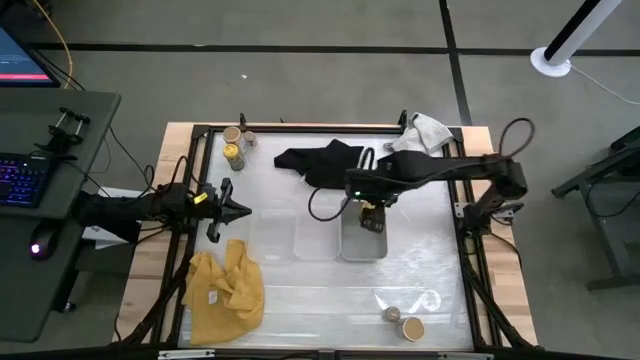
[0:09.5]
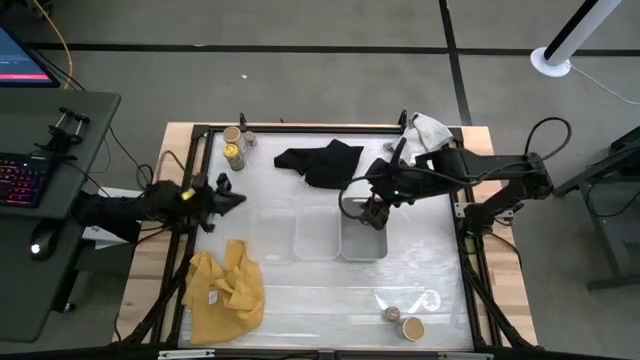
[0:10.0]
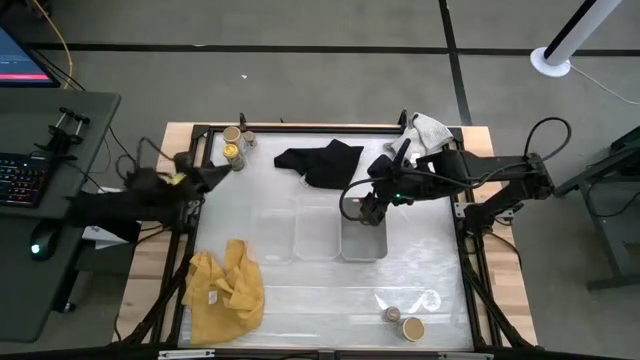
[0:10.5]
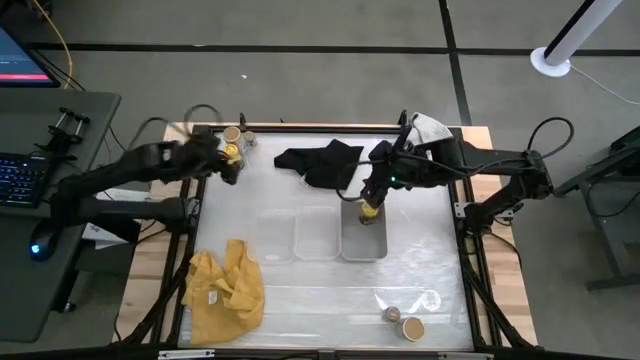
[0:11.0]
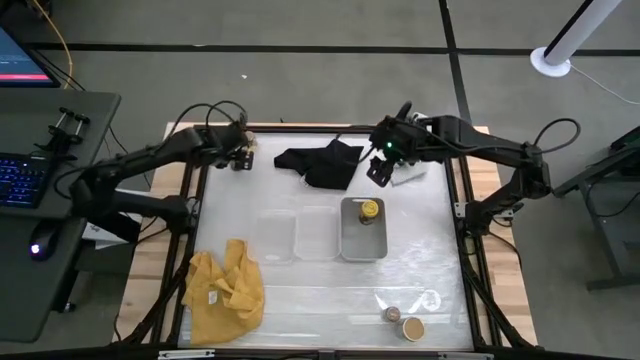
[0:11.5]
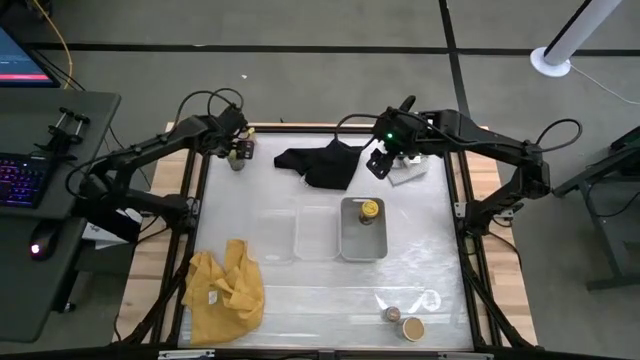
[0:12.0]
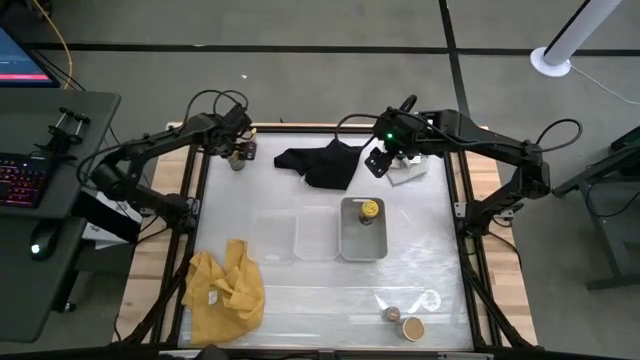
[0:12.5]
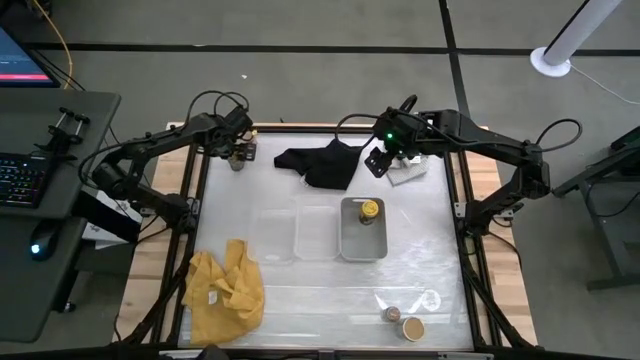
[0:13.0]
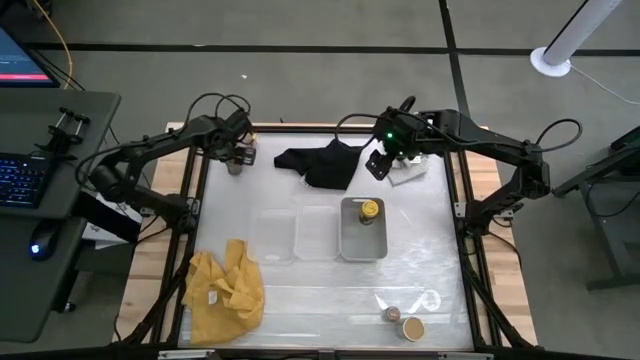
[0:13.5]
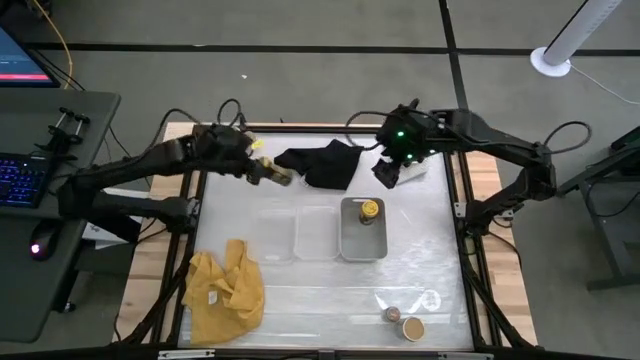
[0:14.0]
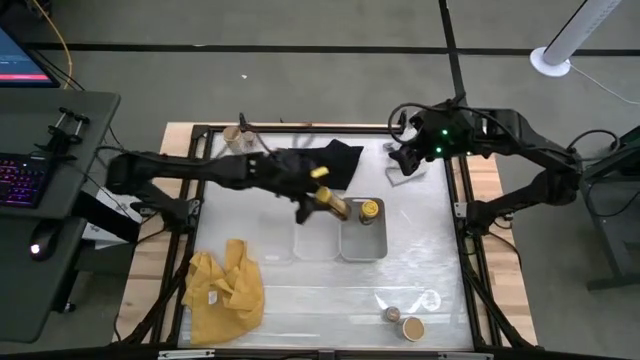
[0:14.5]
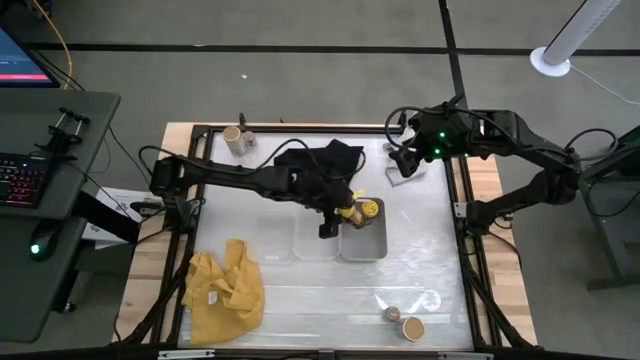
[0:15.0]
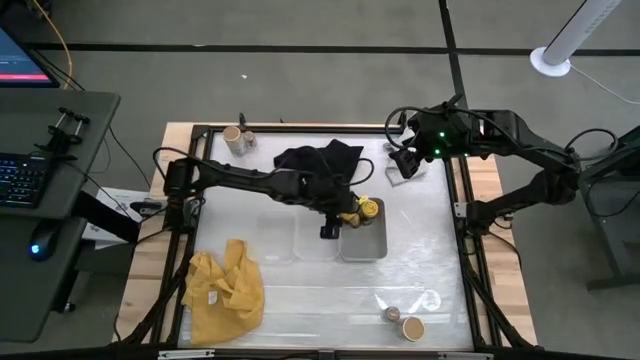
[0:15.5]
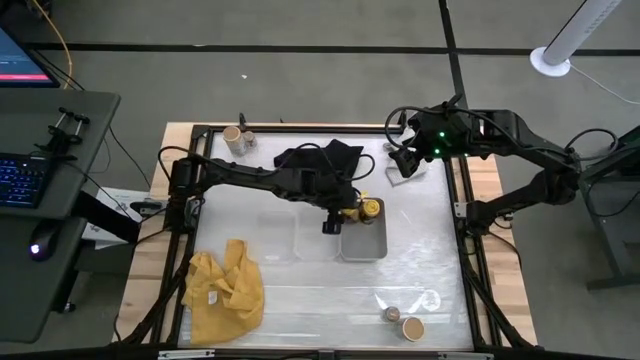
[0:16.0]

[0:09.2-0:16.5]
Task: Sort spices by type
Put the yellow seasoning can into the gray bin

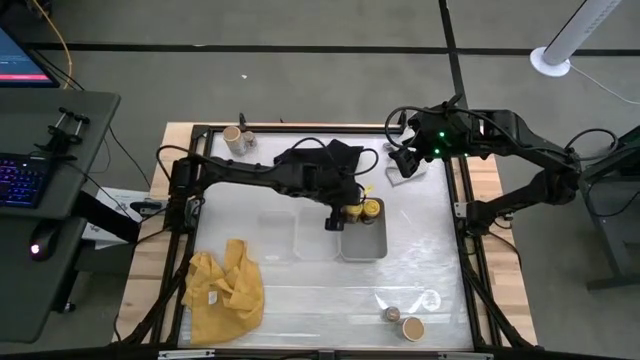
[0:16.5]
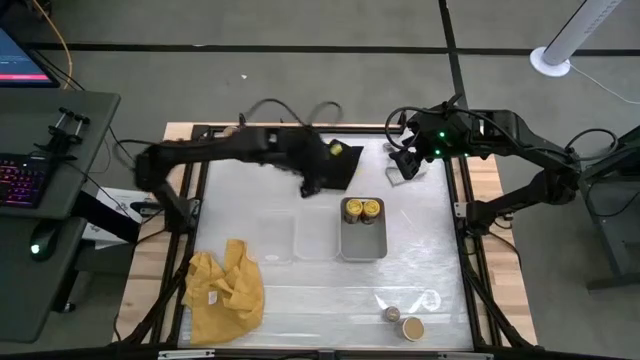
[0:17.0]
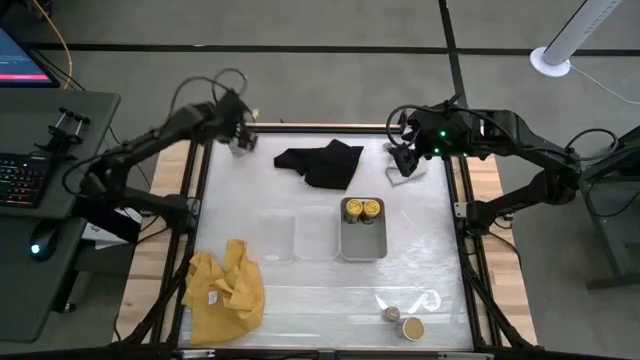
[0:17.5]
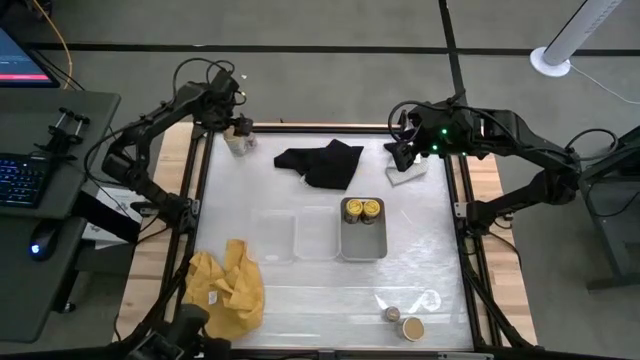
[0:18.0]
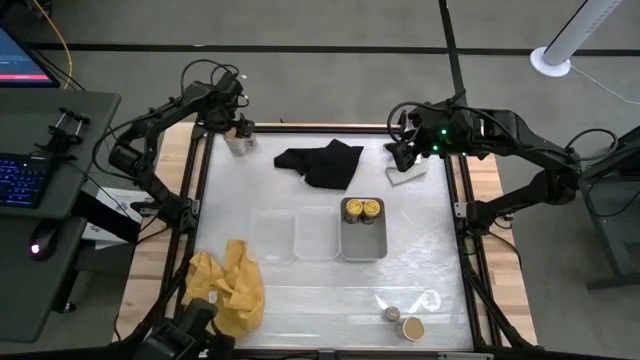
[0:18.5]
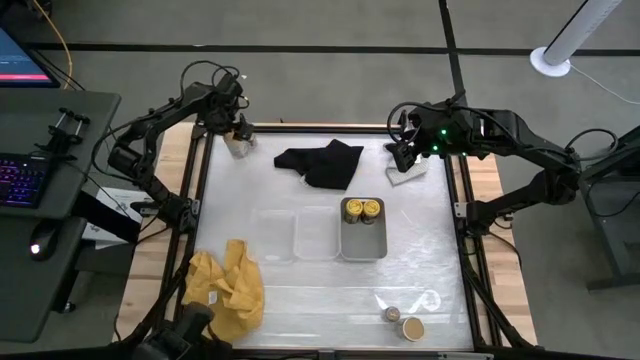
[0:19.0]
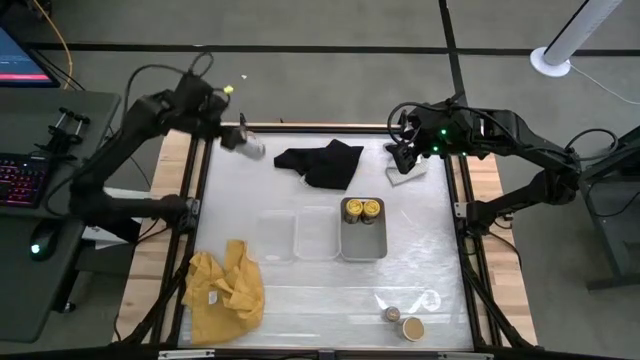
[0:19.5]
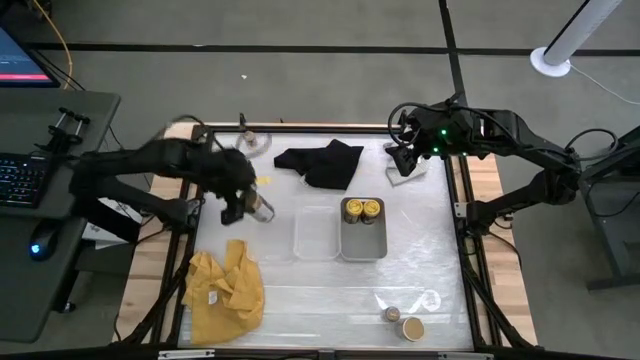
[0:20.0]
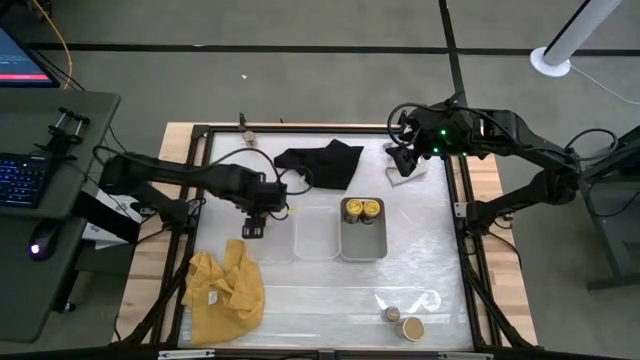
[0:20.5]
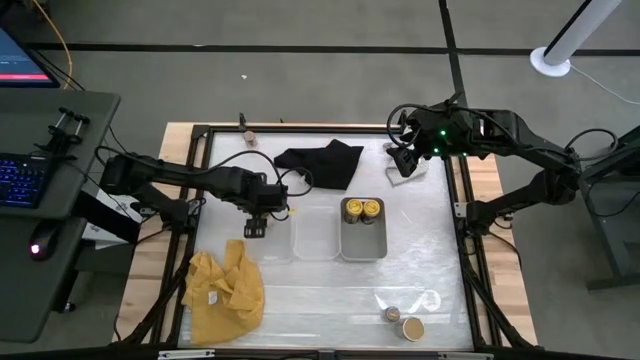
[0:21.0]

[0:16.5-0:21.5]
Put the top gold seasoning bottle into the left transparent bin

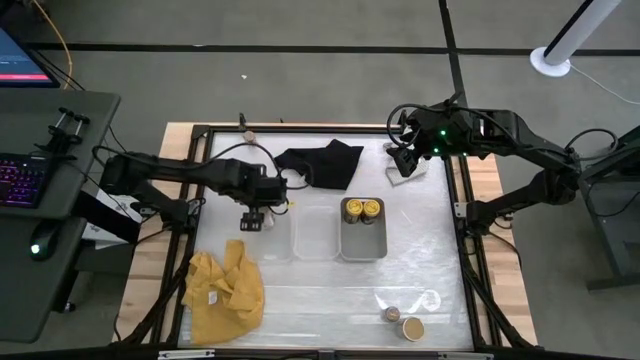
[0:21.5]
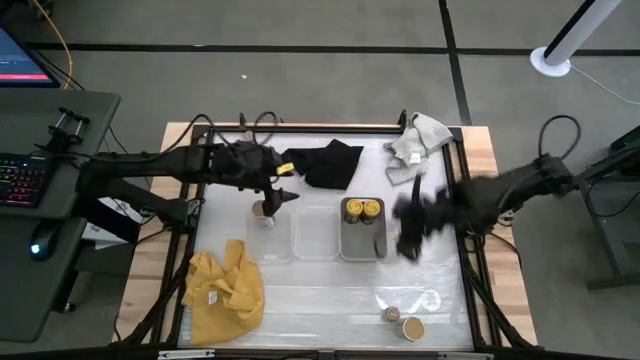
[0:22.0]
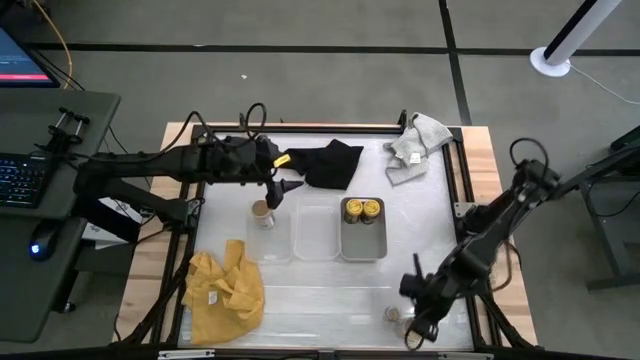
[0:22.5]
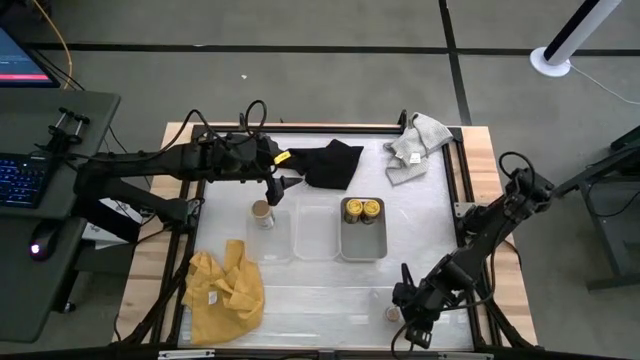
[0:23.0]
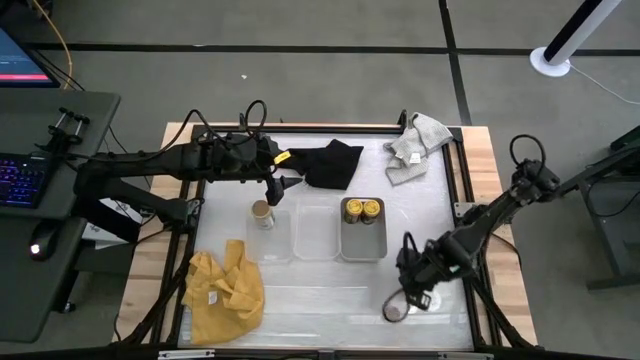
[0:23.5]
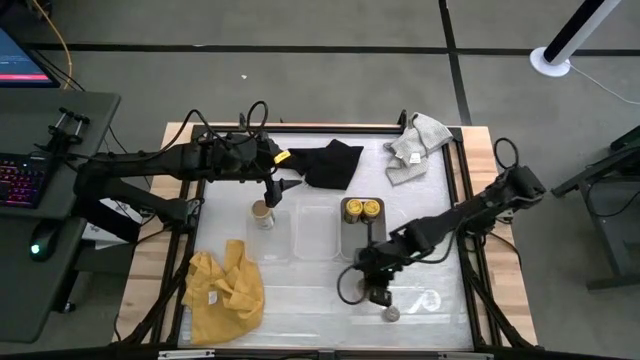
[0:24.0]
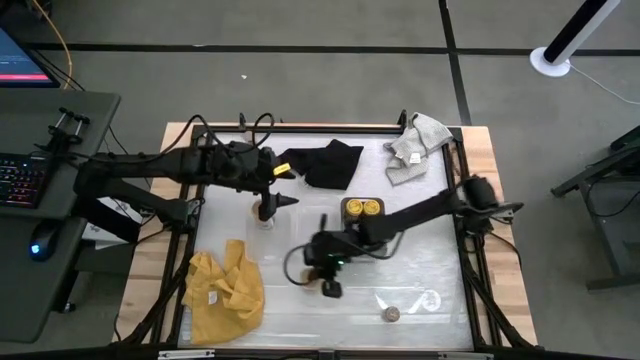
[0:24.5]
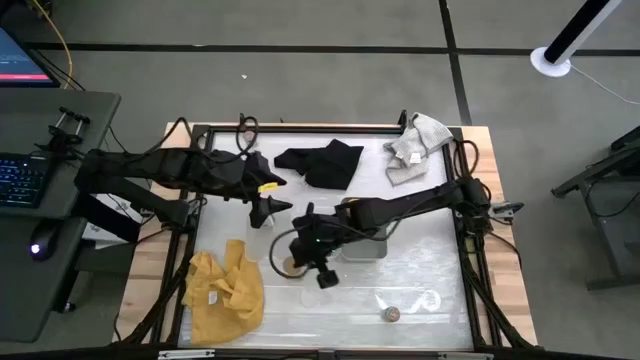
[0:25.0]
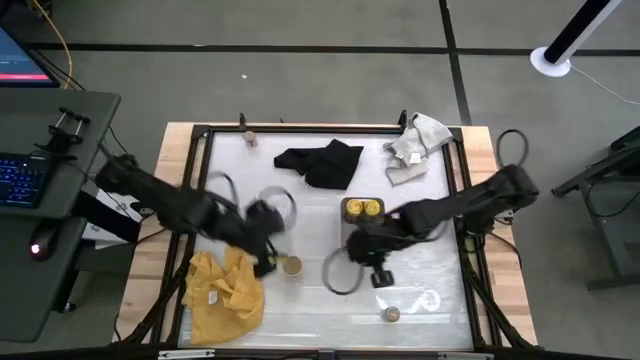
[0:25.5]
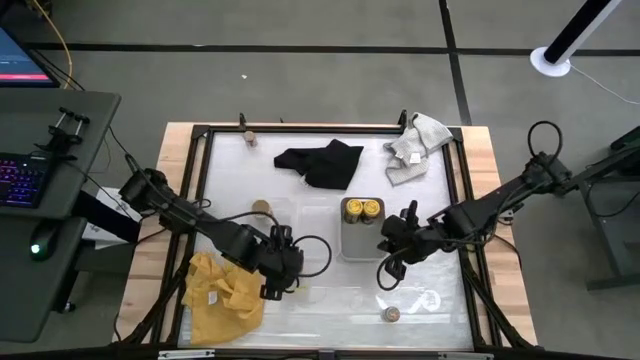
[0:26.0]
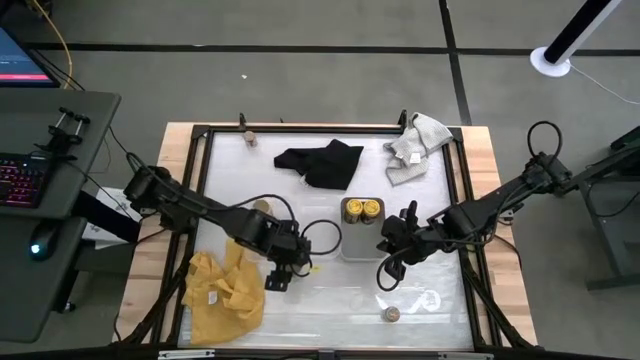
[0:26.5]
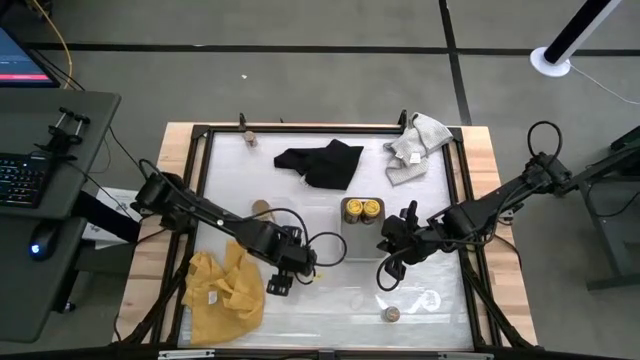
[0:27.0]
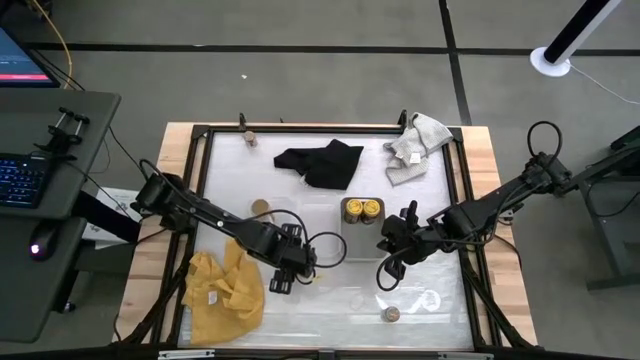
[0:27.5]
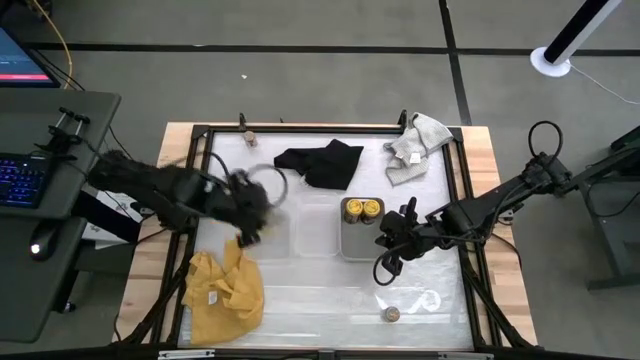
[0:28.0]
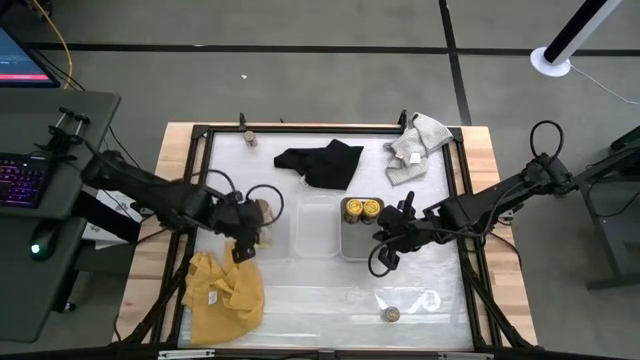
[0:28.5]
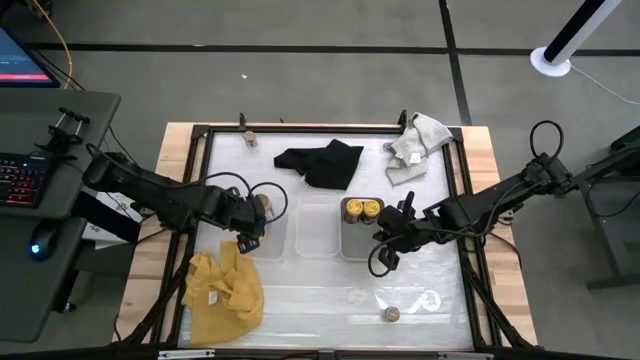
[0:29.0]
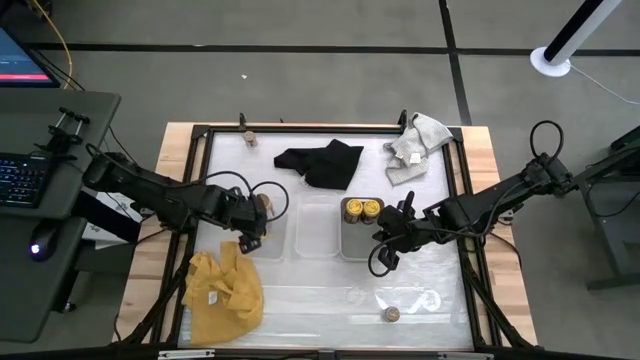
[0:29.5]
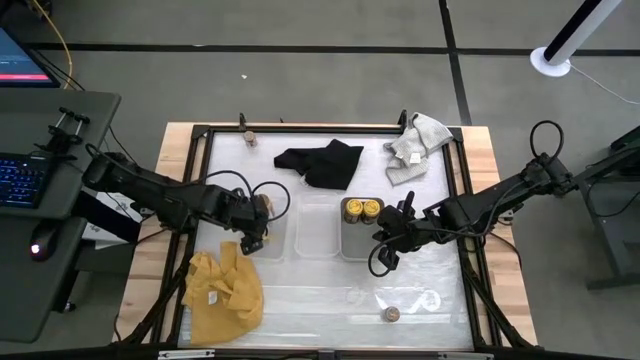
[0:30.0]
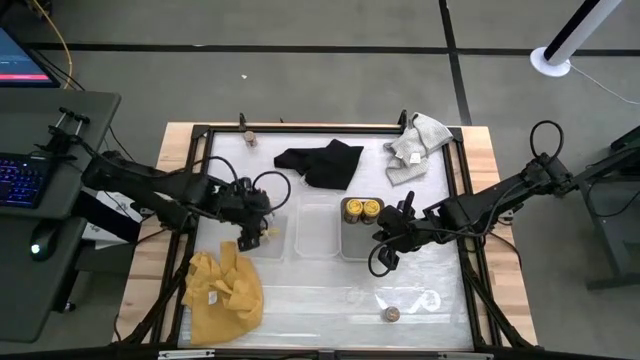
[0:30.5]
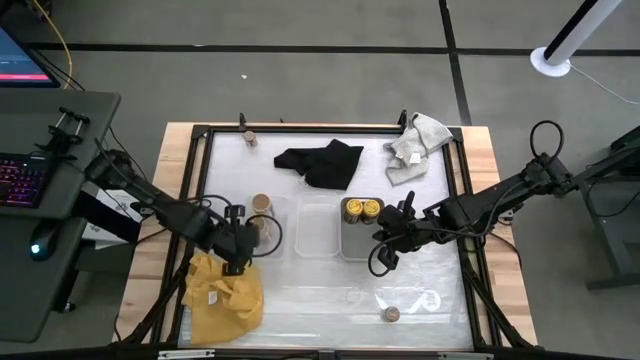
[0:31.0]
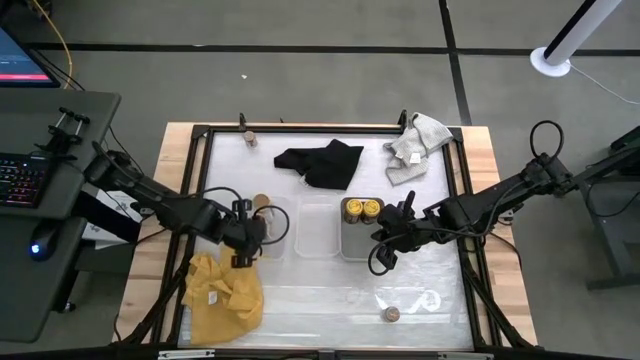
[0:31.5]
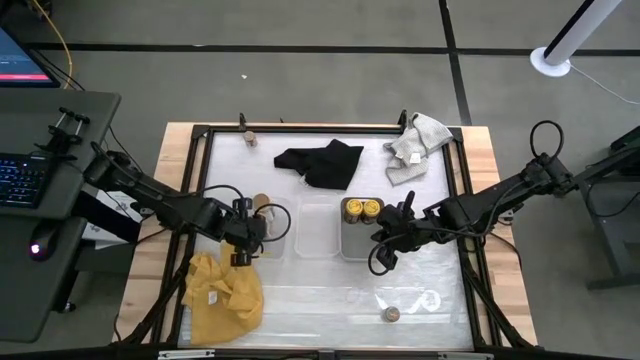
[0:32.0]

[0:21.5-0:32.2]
Put the gold seasoning bottle into the left transparent bin
